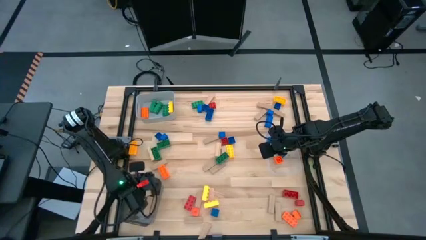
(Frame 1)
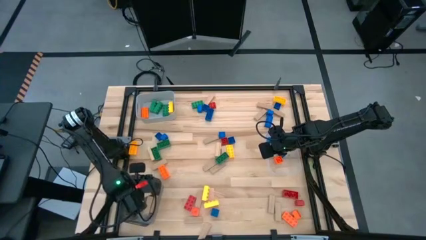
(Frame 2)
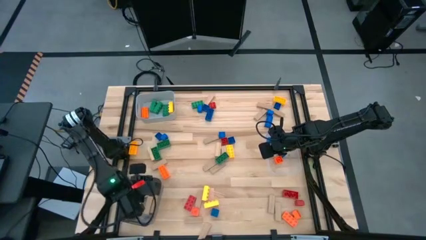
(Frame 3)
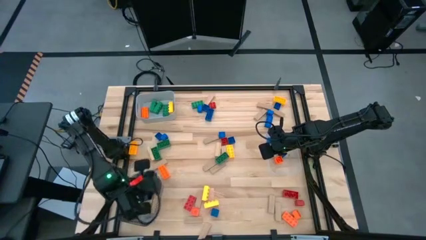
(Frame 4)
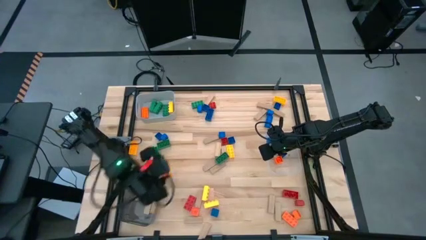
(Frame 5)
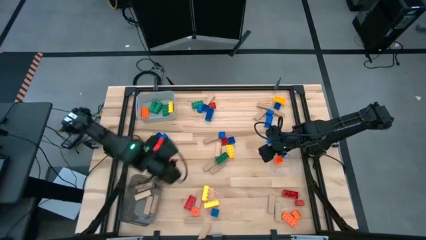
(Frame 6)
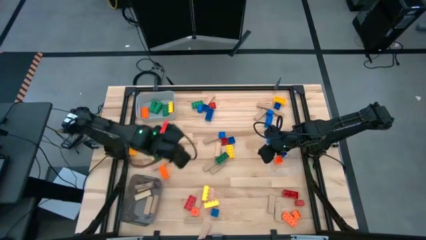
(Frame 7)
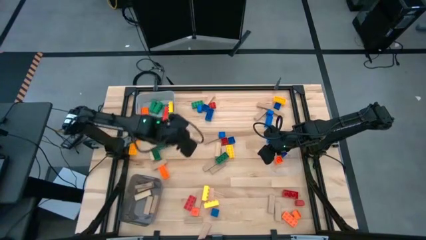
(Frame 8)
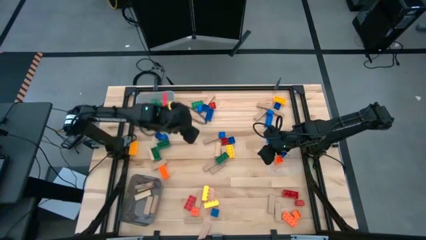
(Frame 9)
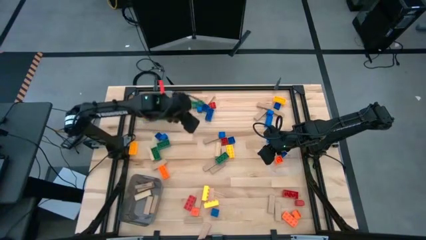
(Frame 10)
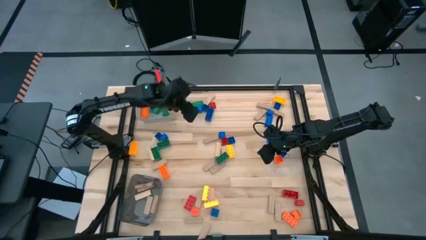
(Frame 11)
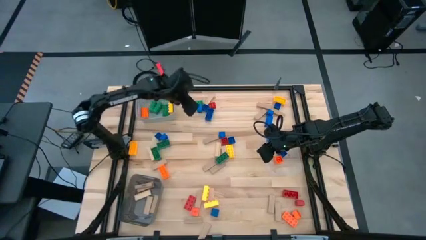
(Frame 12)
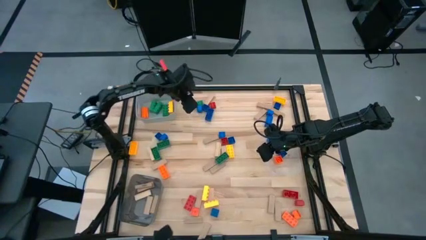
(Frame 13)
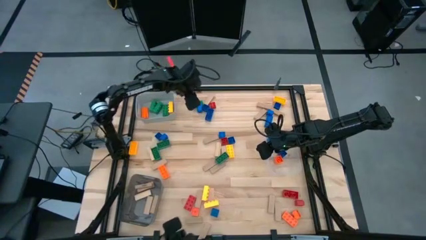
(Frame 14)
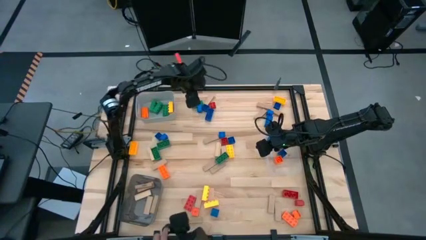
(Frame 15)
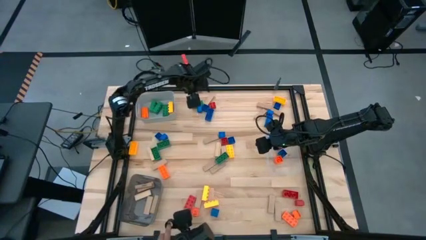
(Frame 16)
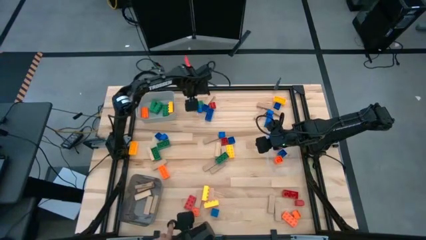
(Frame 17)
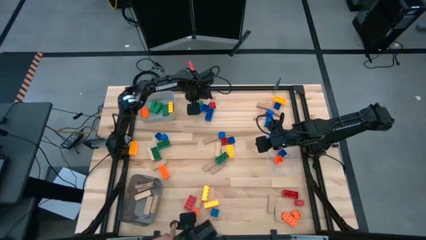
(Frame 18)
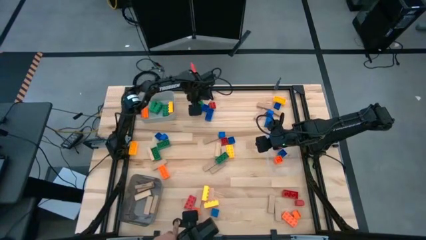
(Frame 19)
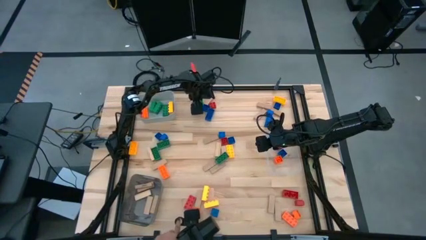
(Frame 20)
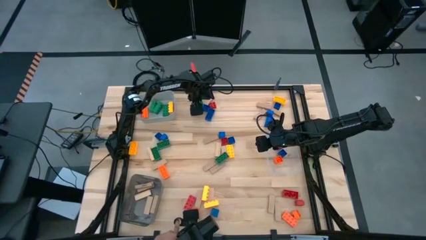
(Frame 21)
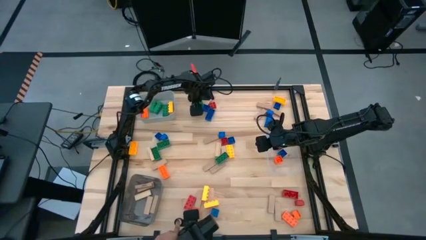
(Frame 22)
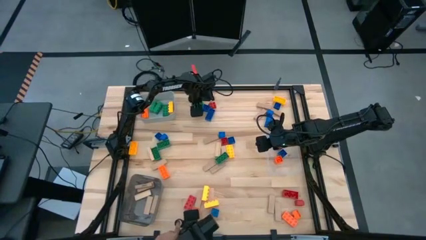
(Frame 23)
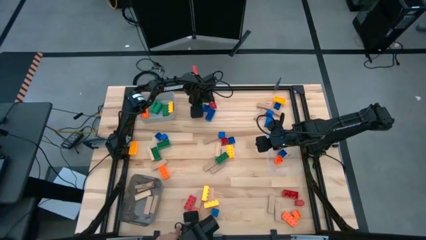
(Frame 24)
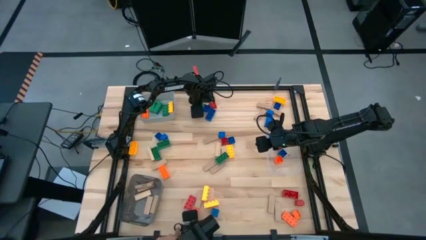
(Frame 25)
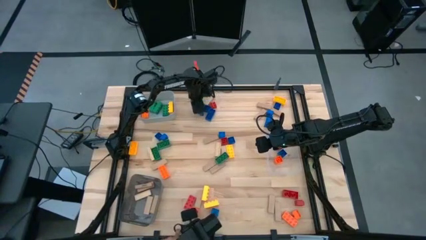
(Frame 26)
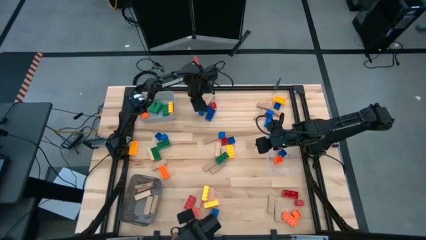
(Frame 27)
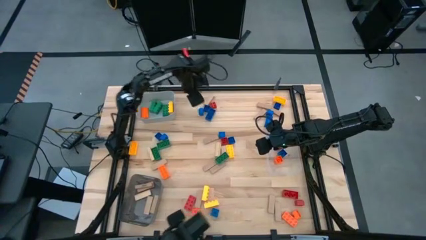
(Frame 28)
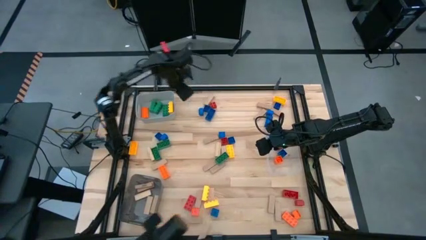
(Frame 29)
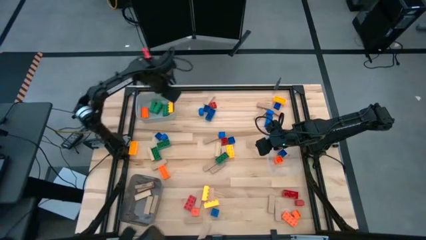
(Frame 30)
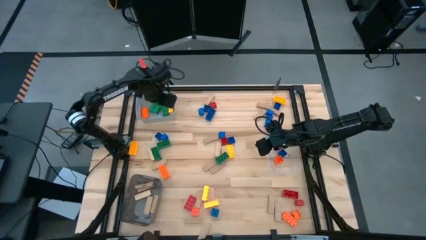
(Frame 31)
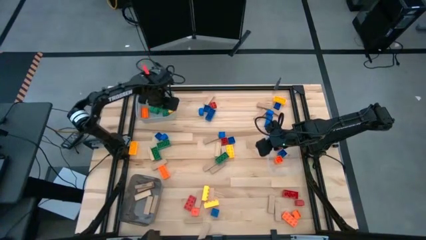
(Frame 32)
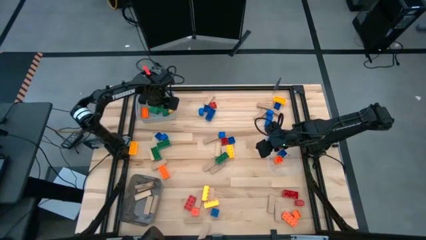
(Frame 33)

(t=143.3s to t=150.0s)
Task: Sort blocks by size
Put the large green game piece into the gray bin

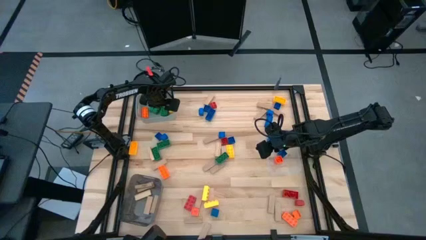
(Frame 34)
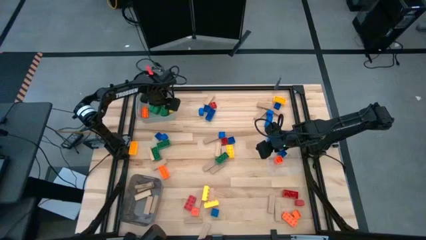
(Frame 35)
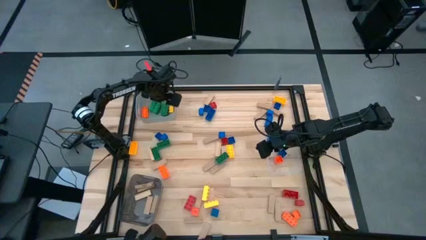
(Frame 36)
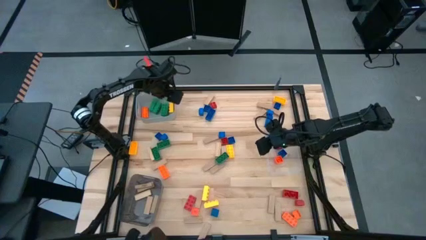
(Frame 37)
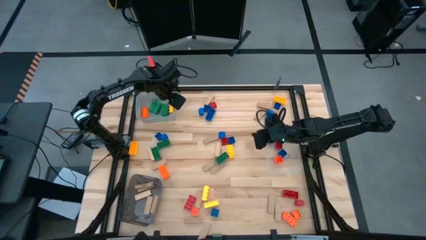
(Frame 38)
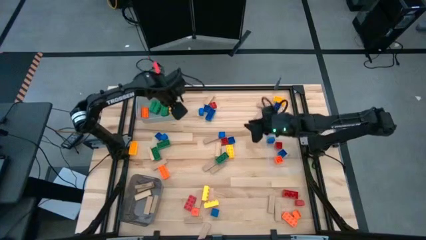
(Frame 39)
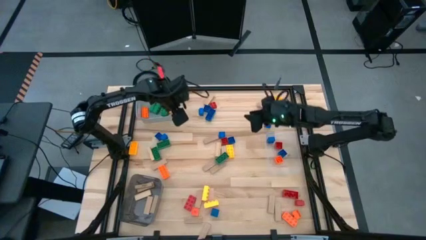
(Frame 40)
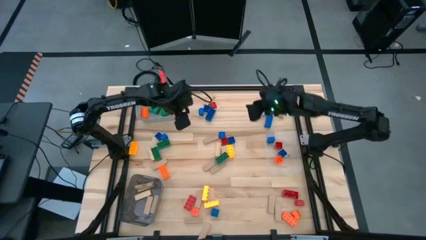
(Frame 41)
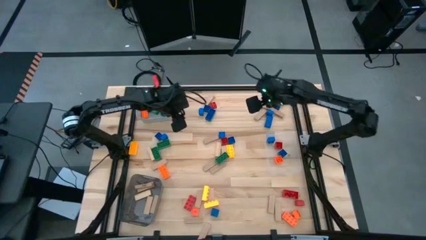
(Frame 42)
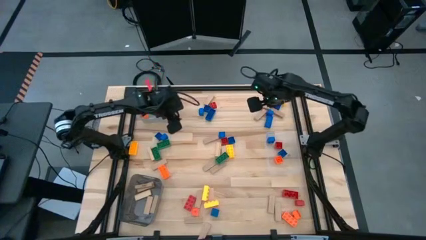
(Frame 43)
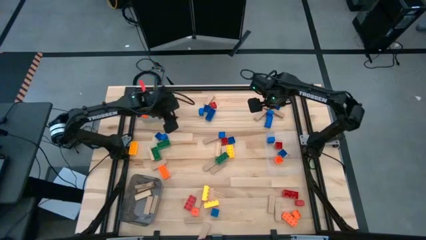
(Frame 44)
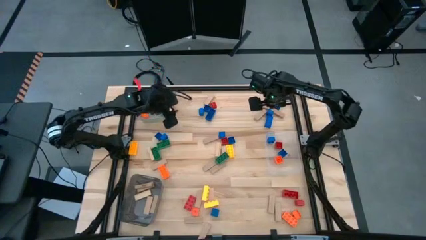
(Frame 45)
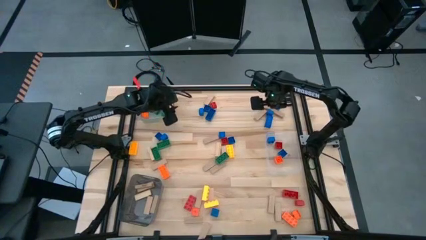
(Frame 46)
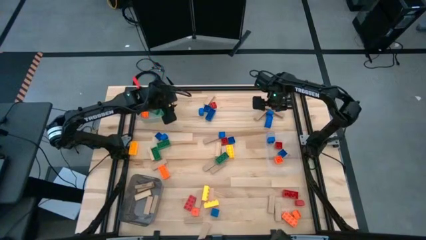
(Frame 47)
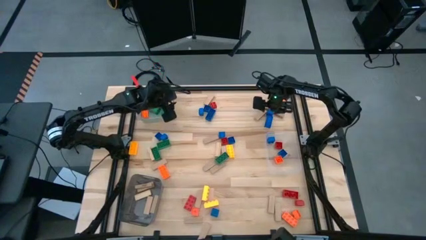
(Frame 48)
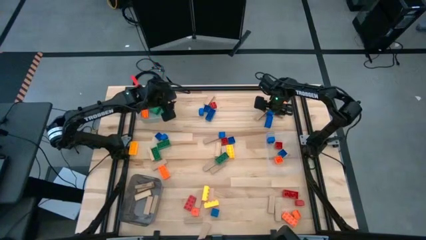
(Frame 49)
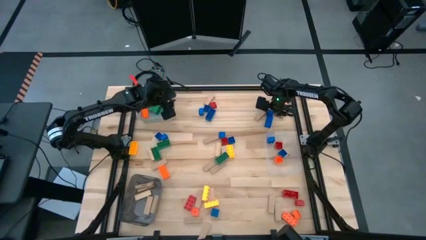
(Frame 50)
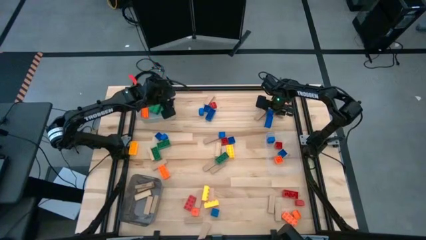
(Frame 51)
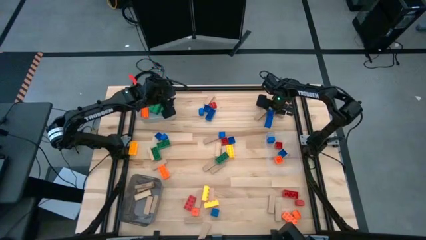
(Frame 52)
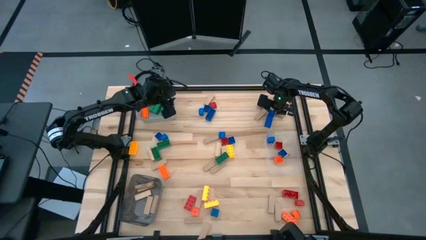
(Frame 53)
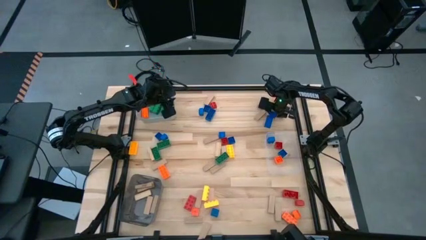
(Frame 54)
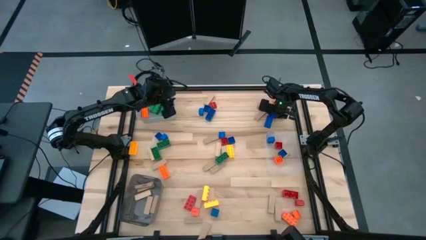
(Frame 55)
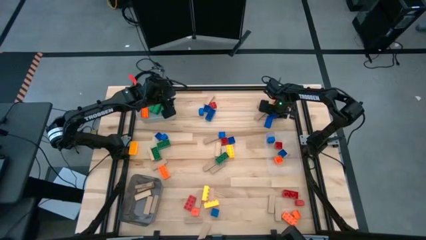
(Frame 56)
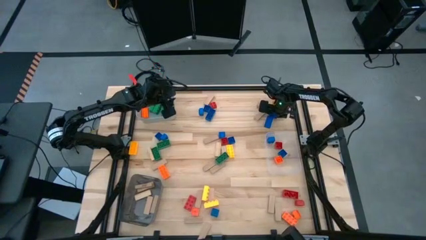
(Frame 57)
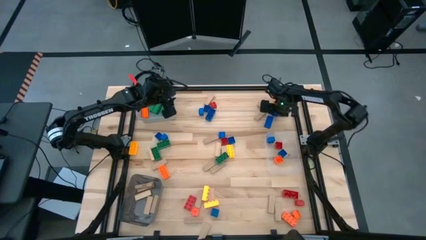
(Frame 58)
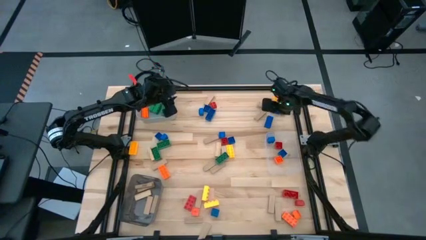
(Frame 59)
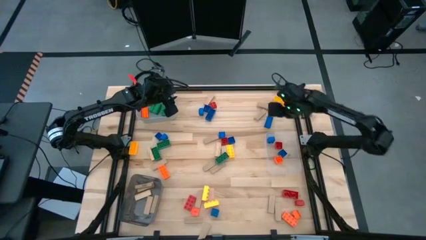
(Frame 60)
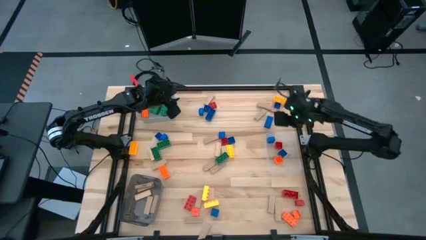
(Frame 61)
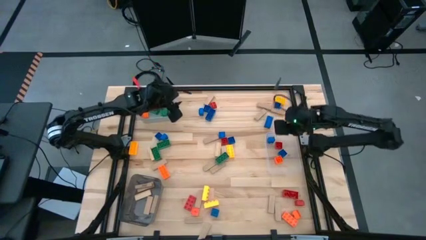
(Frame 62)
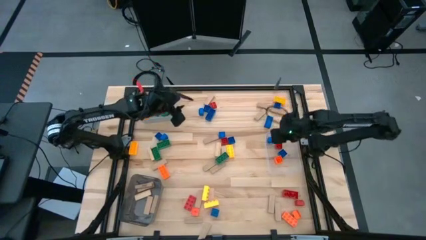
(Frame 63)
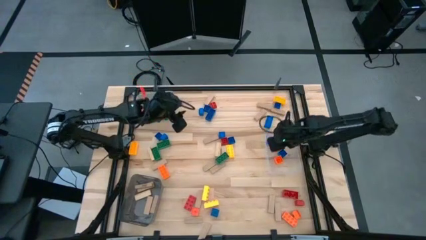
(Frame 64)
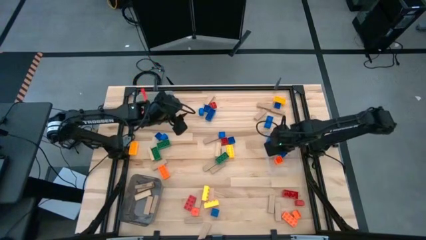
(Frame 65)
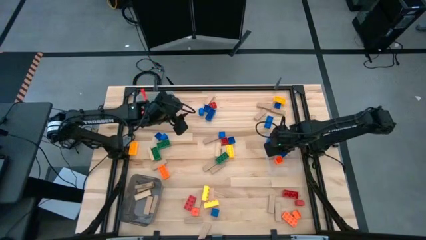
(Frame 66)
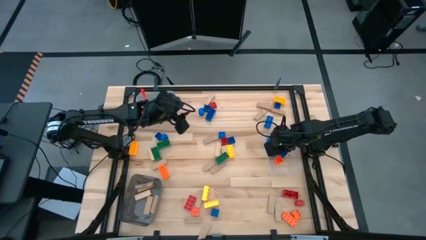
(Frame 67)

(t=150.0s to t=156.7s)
Put the small blue game piece into the transparent bin

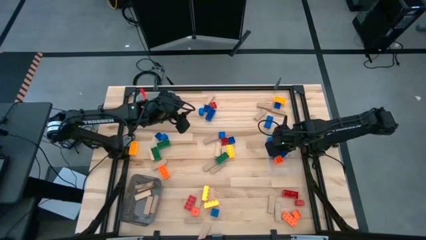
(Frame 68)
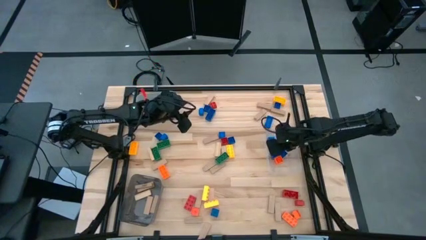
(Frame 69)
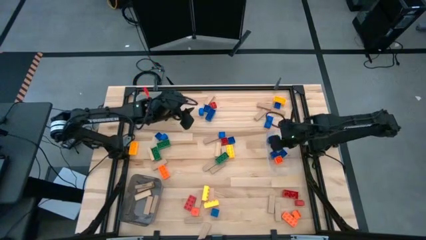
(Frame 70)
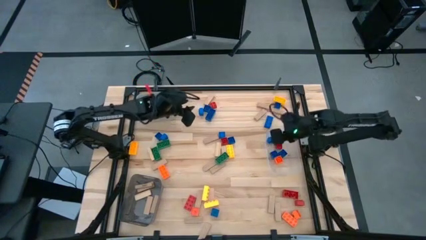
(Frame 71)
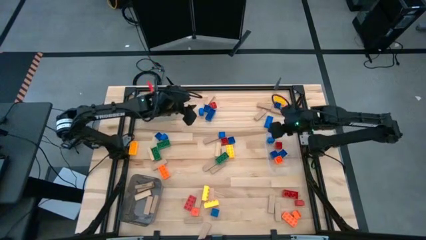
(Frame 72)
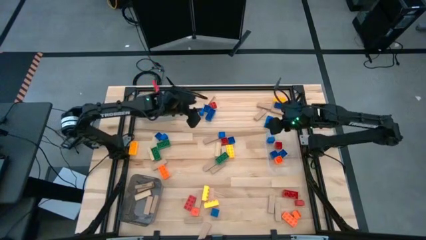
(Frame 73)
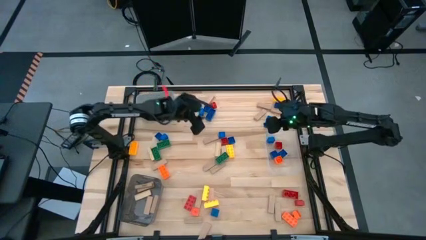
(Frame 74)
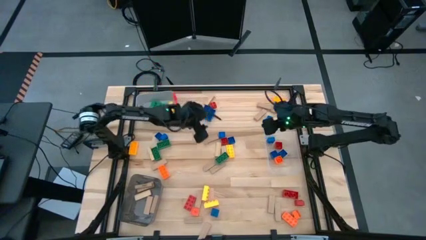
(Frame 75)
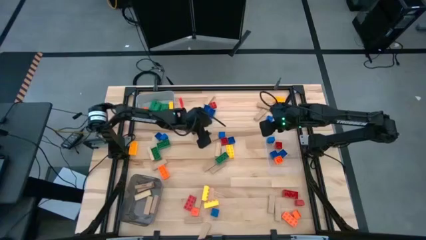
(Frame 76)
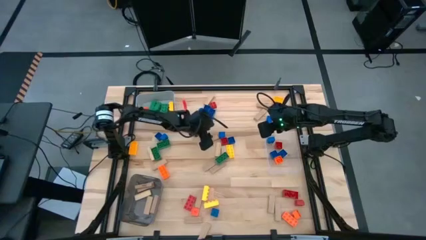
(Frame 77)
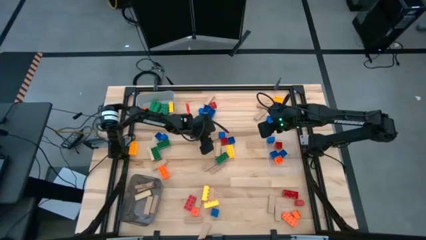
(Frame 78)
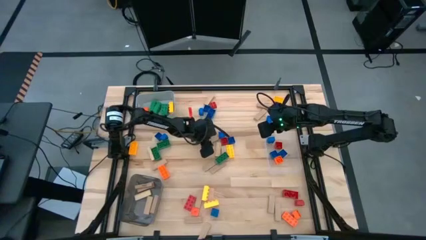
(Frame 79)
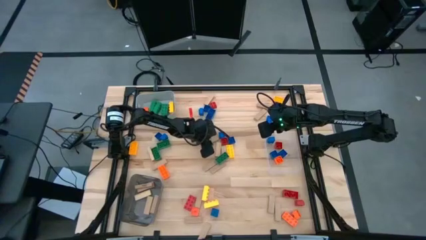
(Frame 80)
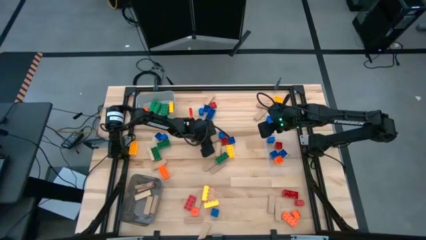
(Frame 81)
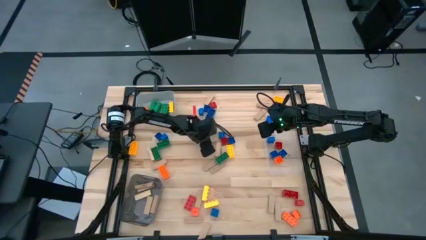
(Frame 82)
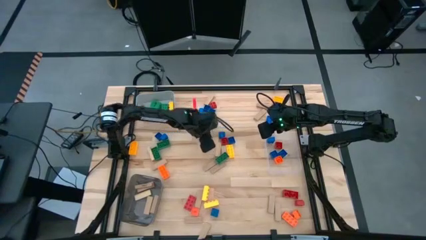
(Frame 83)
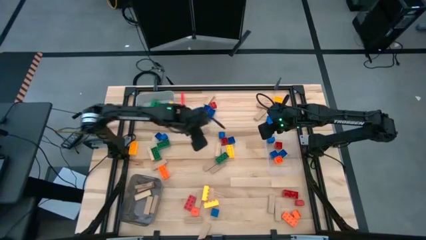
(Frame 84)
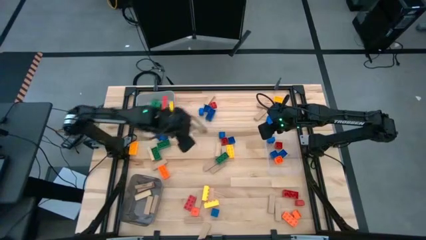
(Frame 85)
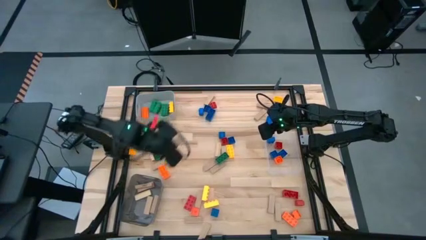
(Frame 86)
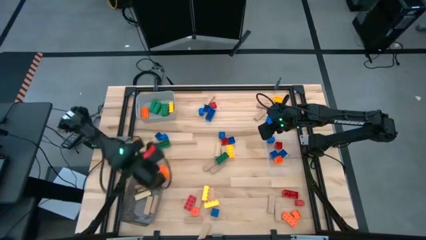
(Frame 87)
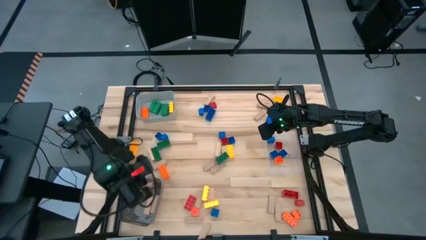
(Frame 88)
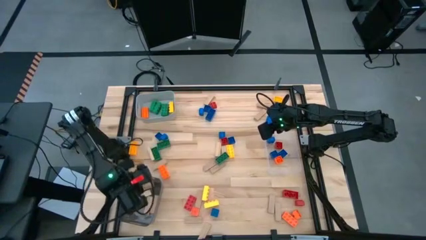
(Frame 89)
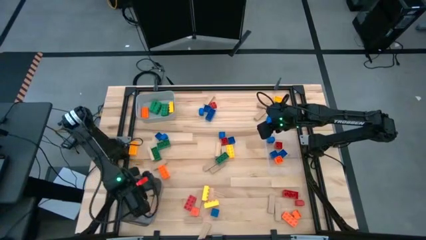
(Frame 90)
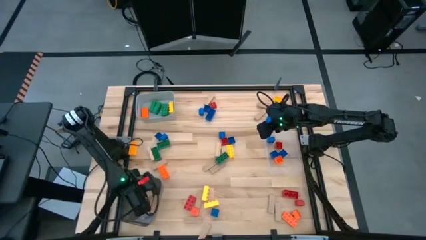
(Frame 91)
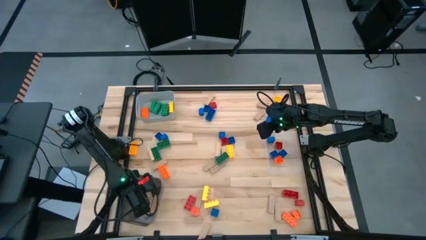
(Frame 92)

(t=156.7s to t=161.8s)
Put the brown block into the black bin
